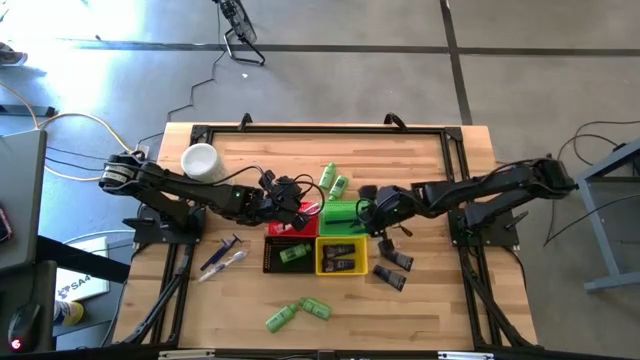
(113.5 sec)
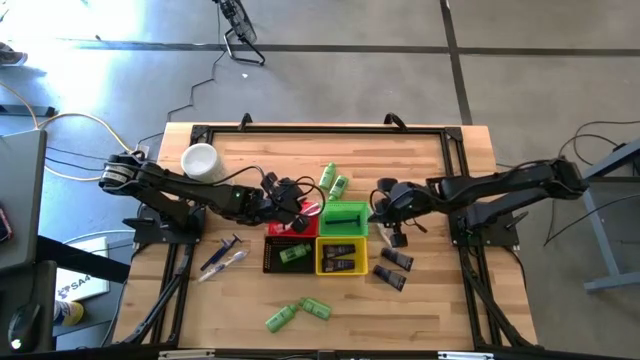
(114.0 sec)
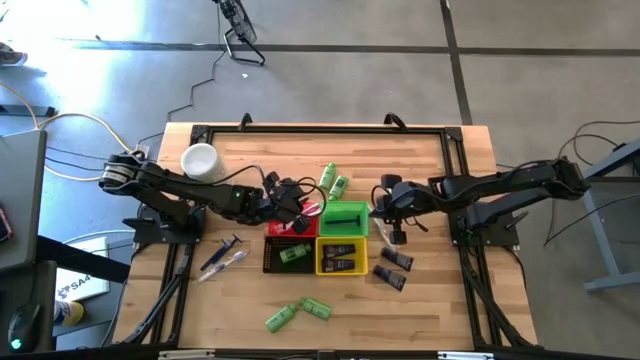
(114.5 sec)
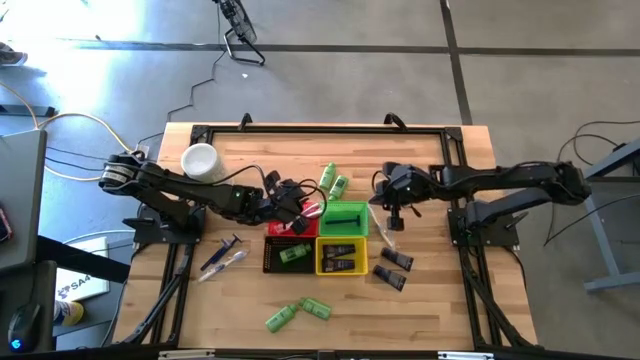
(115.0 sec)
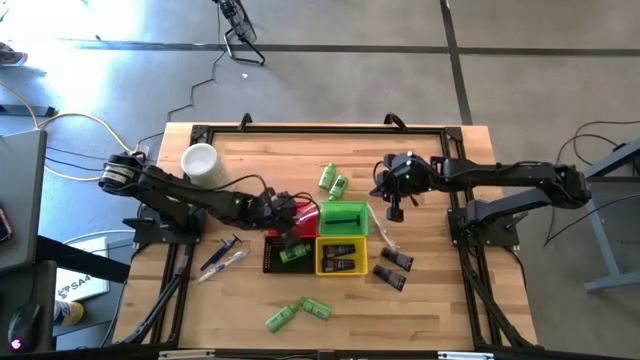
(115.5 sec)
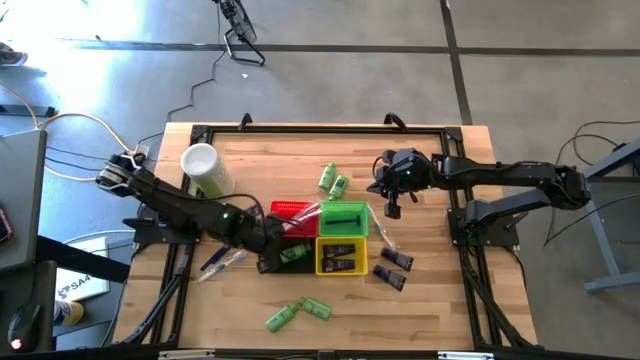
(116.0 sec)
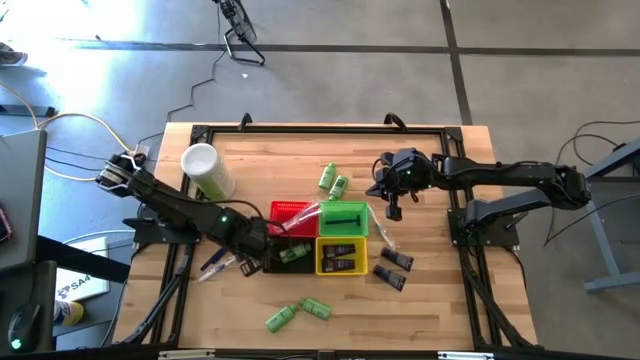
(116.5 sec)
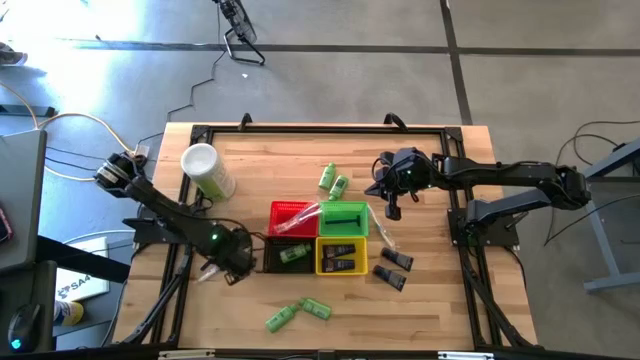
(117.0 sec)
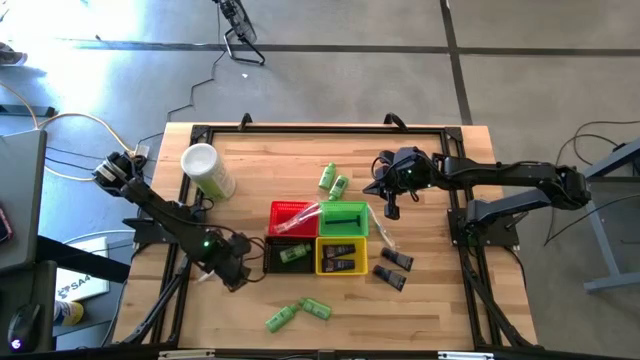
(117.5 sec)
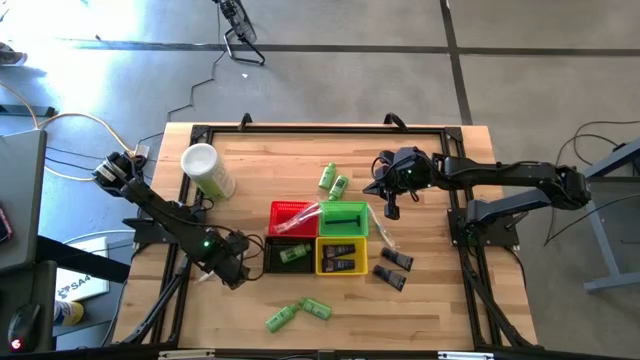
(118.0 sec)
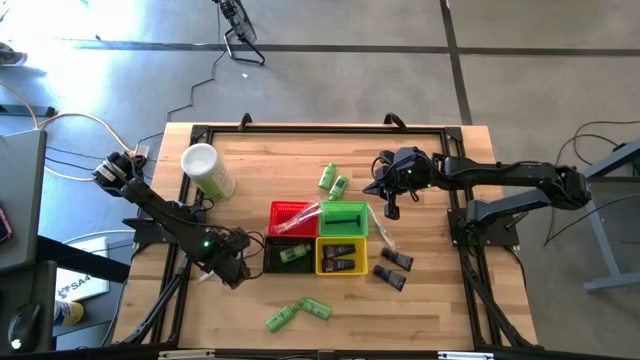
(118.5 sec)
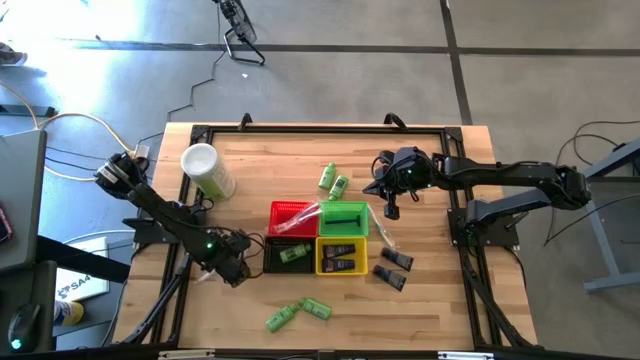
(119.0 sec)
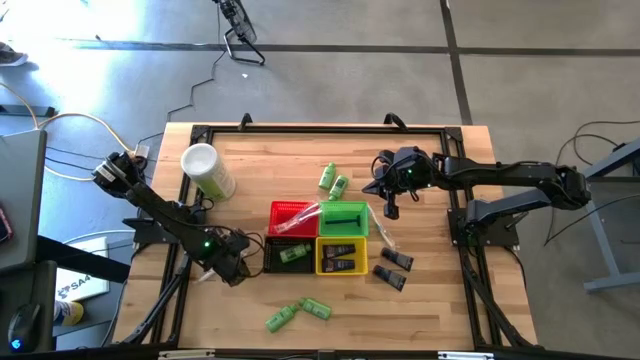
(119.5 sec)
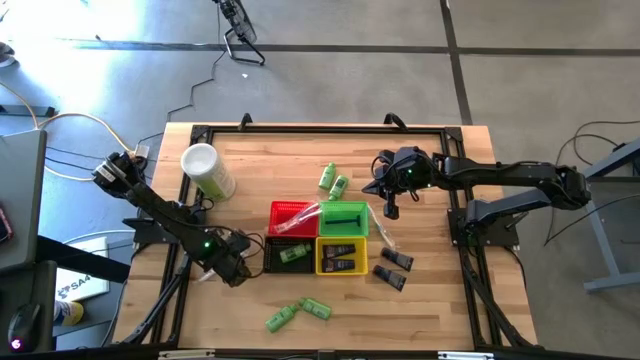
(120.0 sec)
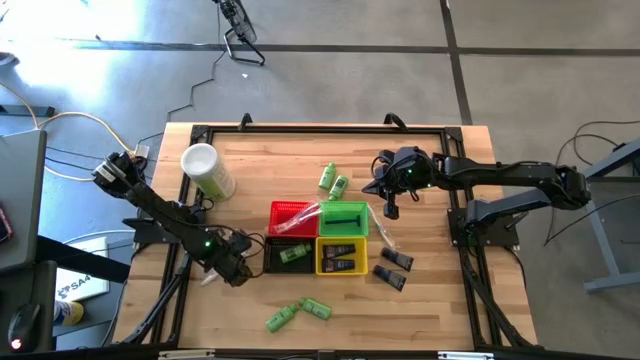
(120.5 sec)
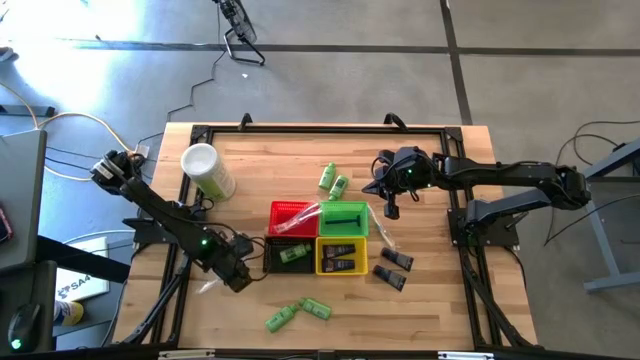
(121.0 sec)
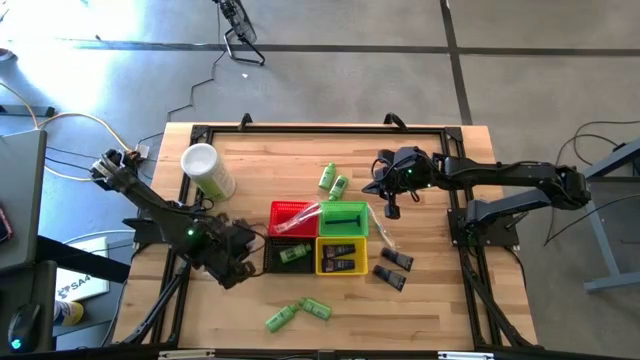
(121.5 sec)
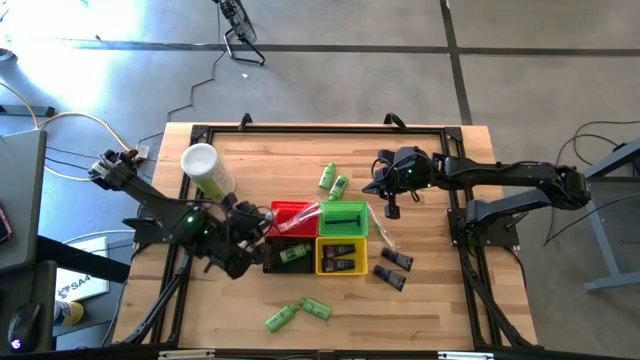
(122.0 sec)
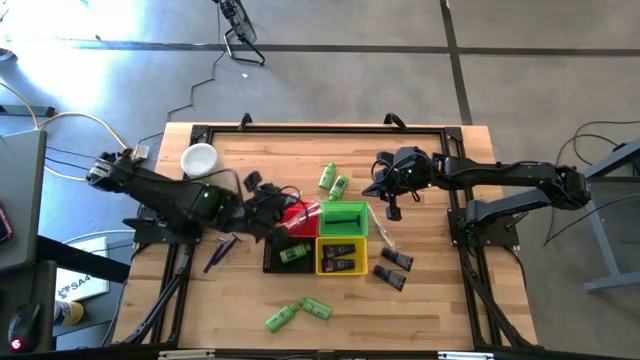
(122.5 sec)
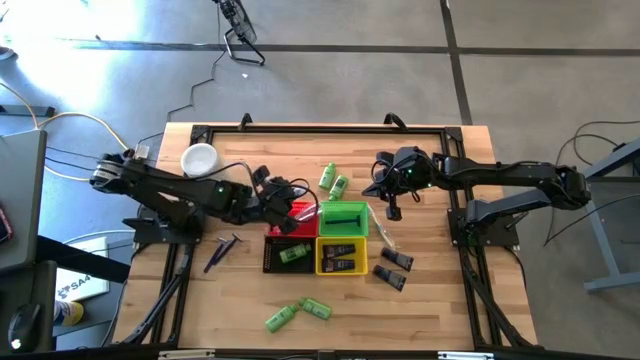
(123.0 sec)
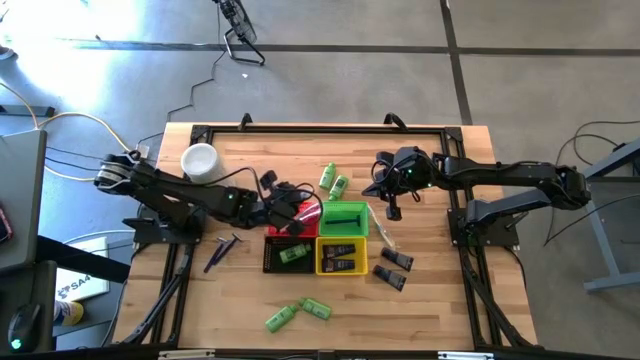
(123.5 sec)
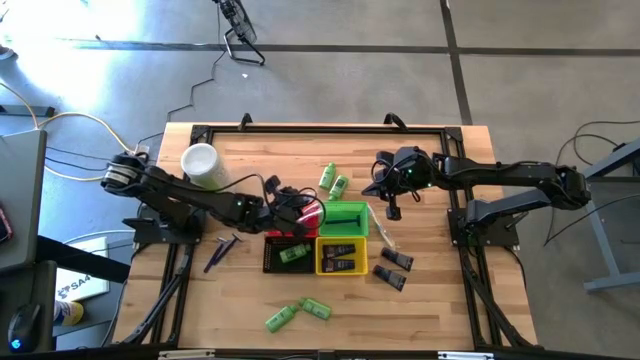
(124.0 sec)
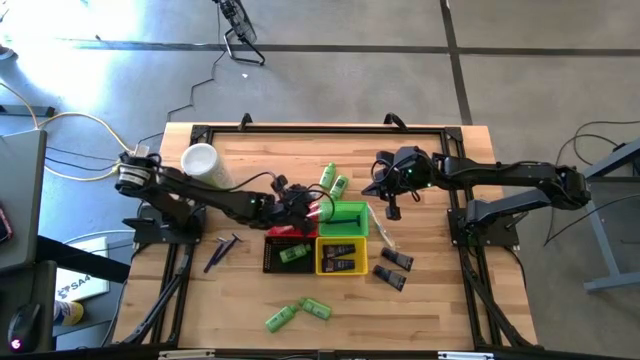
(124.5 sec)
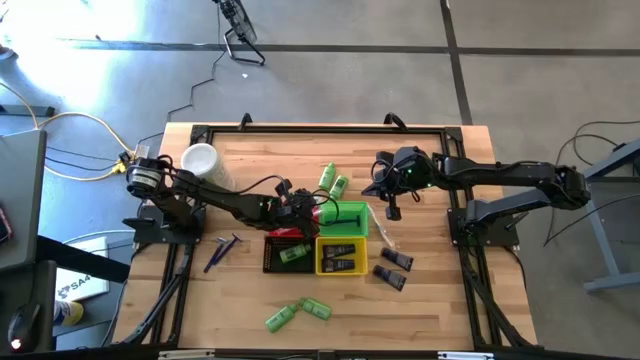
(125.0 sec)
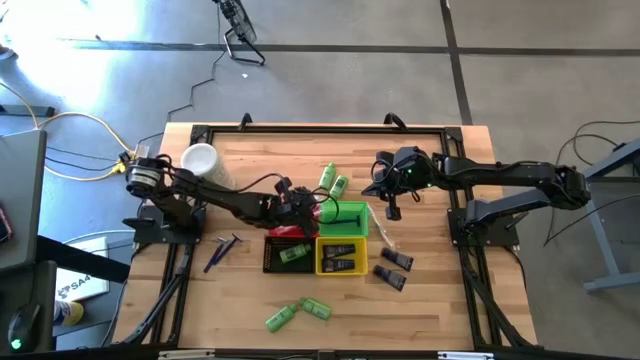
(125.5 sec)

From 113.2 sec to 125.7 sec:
Task: Pick & Place Travel size toiletries
Put the blue toothbrush into the red bin

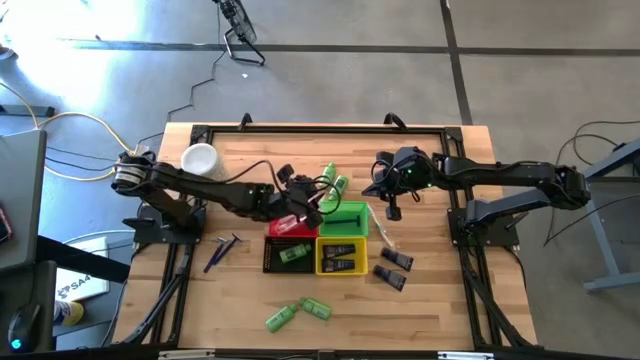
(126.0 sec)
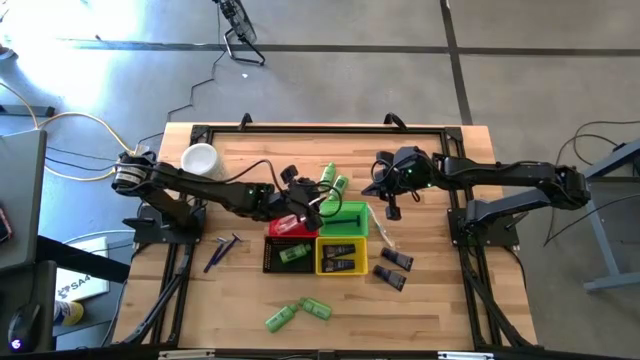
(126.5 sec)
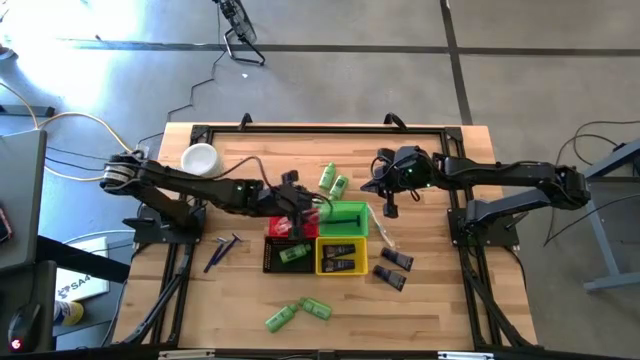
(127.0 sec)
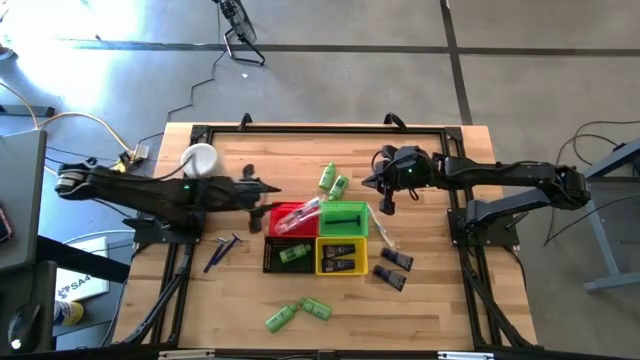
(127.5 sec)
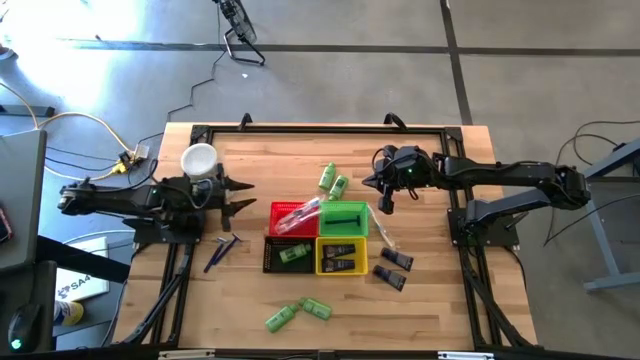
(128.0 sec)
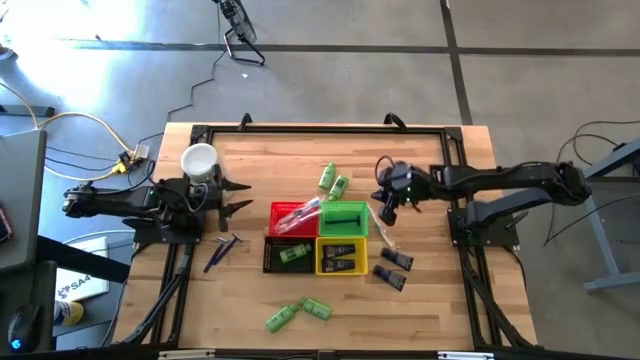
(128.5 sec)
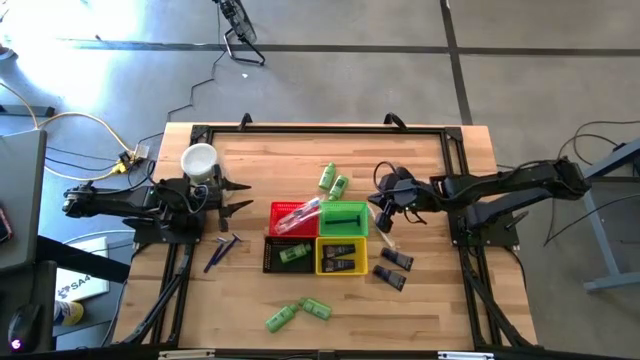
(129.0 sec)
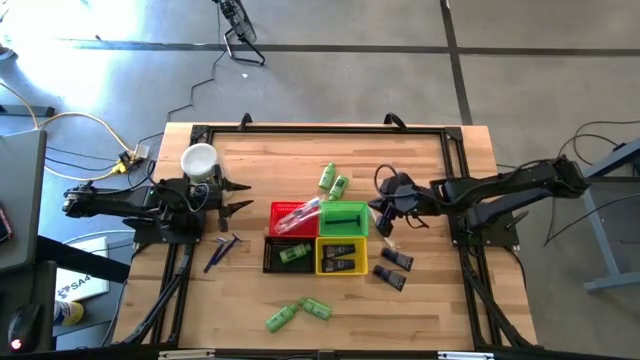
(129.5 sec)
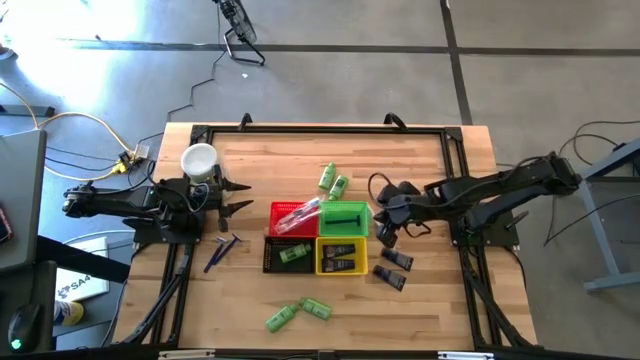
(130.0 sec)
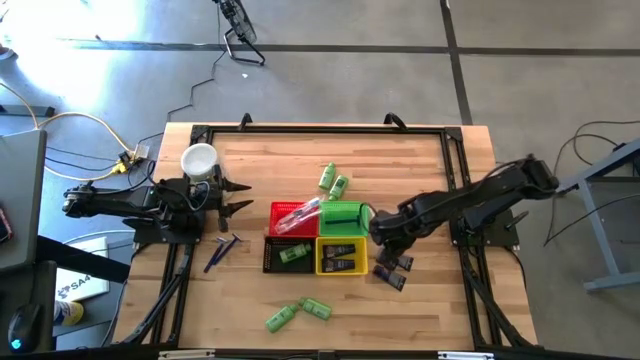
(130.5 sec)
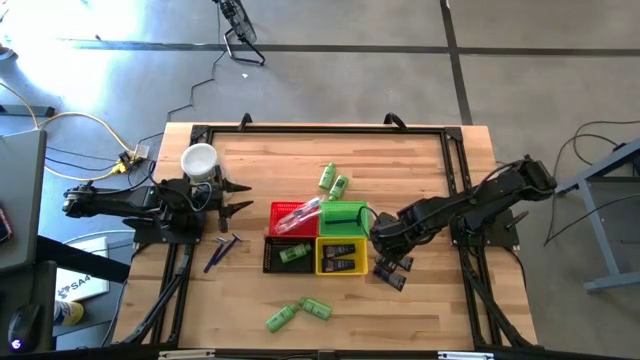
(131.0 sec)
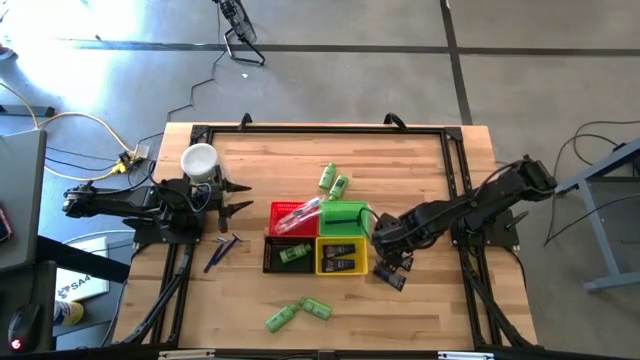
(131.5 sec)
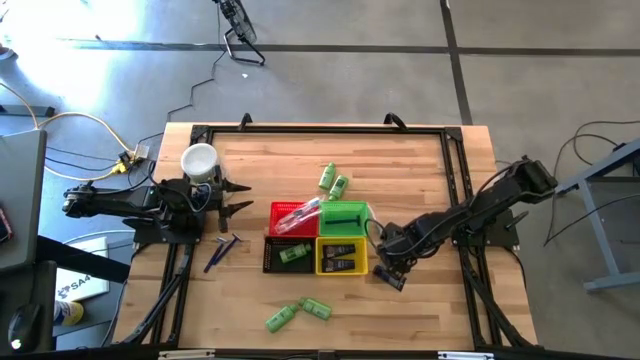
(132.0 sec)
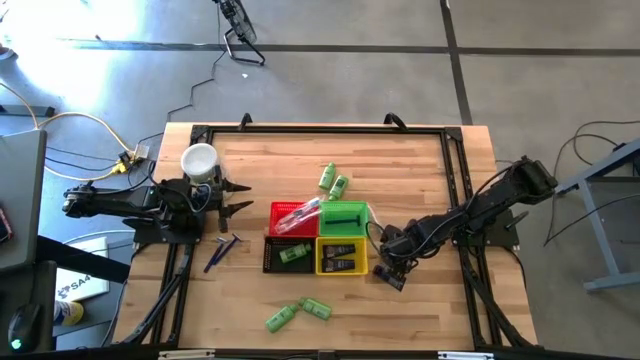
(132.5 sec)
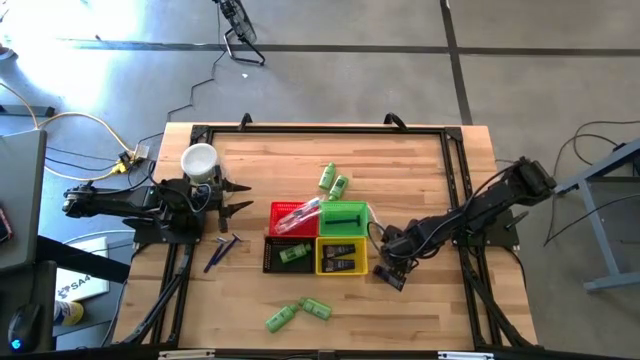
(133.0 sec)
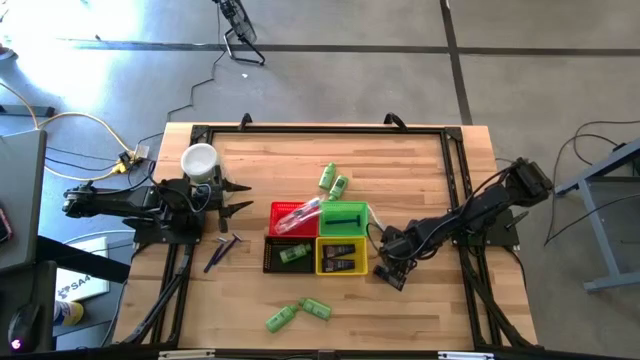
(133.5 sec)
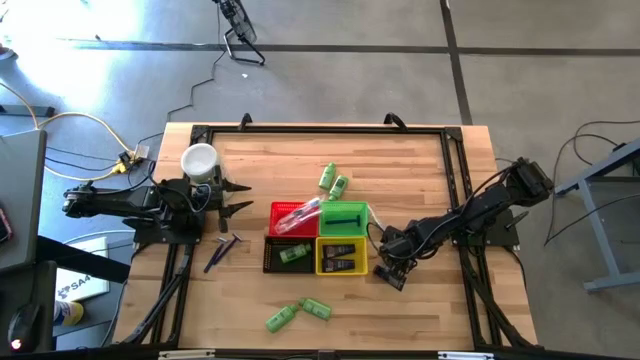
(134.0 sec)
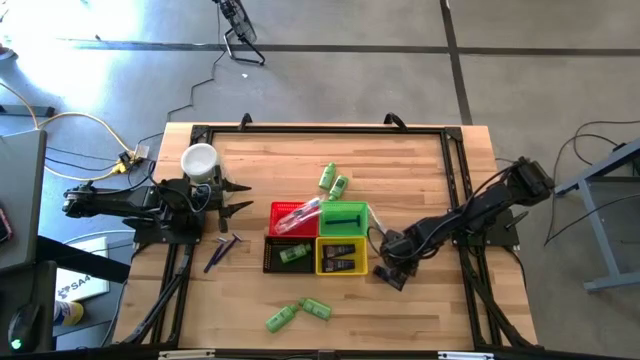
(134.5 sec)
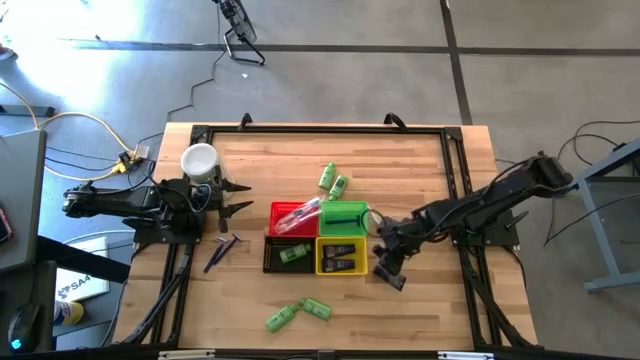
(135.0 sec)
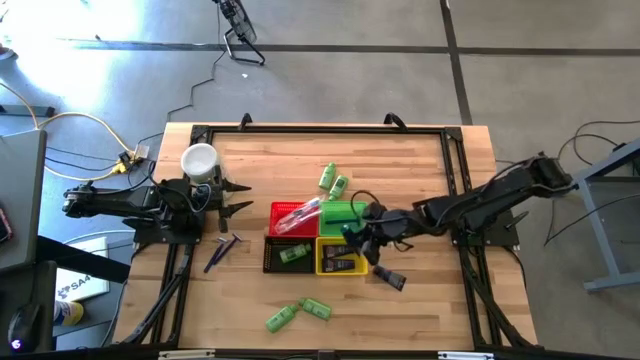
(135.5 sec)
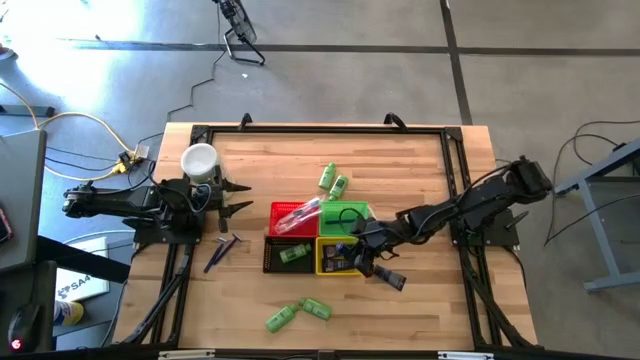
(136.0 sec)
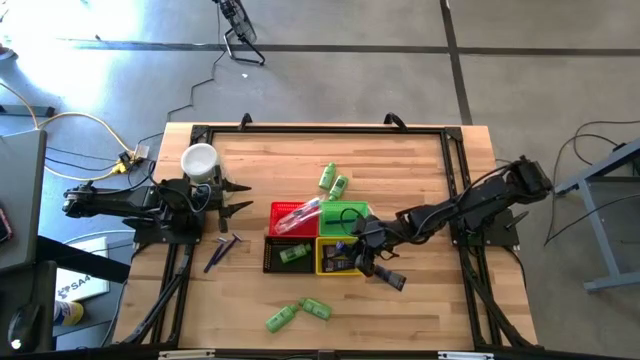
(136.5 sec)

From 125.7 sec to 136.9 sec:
Put the dark blue shaving cream into the yellow bin
